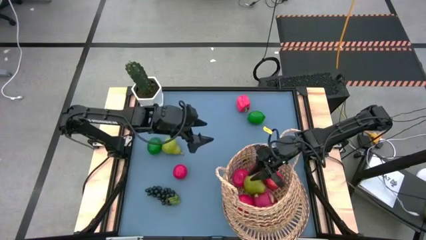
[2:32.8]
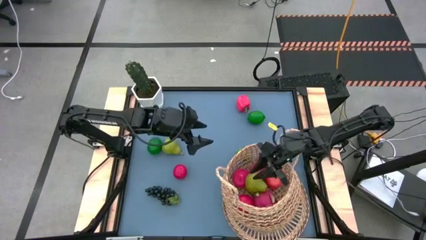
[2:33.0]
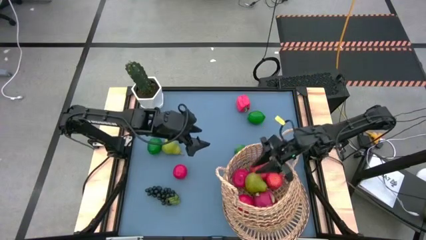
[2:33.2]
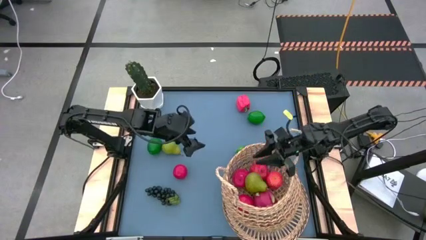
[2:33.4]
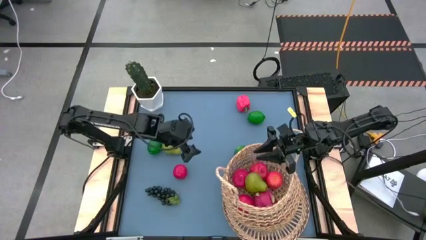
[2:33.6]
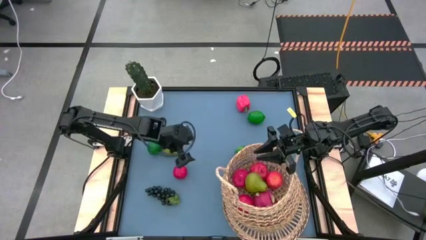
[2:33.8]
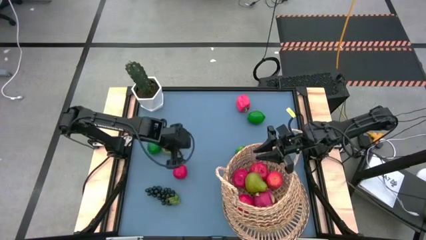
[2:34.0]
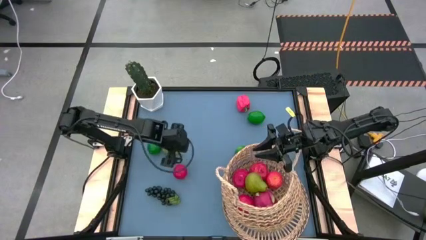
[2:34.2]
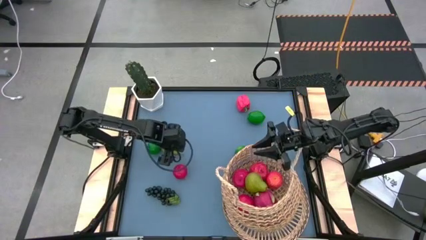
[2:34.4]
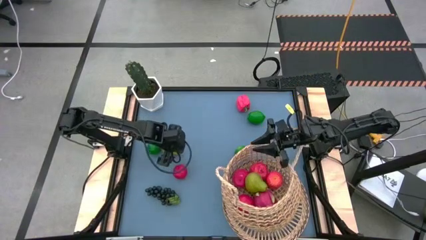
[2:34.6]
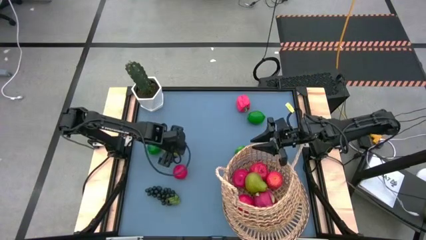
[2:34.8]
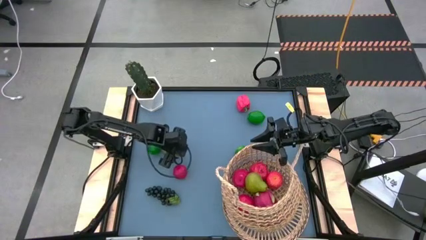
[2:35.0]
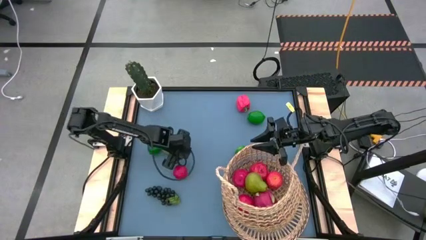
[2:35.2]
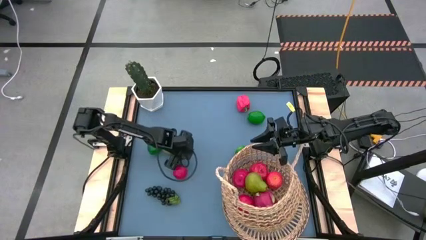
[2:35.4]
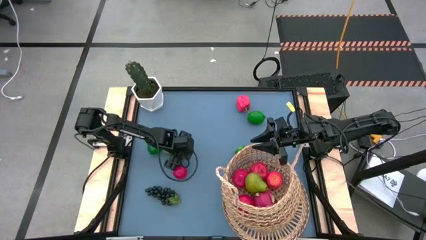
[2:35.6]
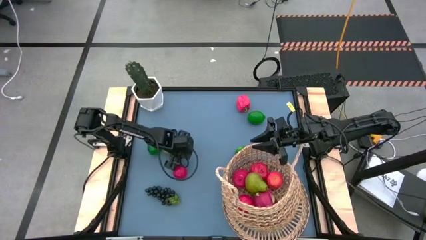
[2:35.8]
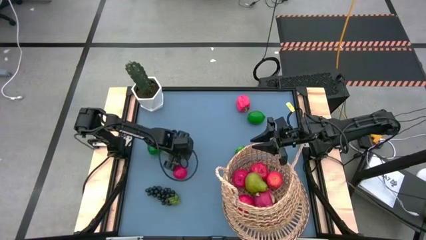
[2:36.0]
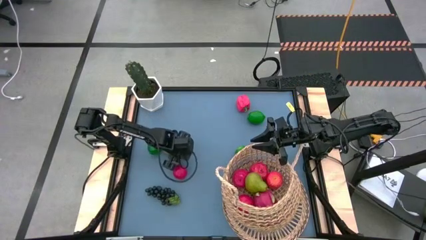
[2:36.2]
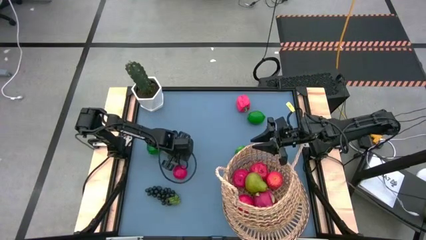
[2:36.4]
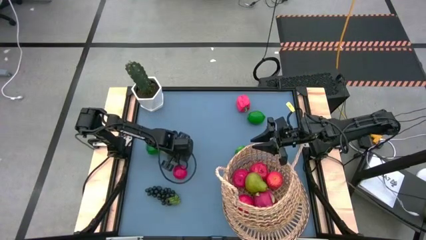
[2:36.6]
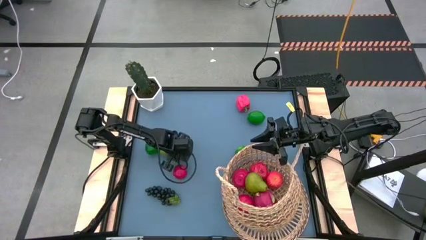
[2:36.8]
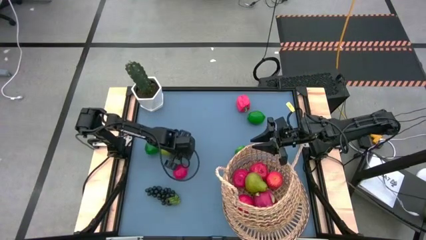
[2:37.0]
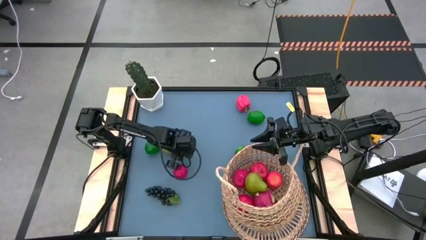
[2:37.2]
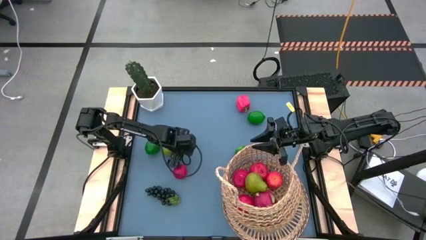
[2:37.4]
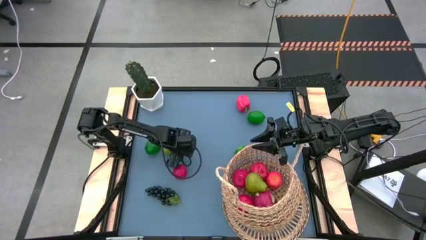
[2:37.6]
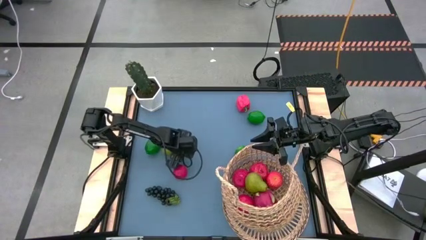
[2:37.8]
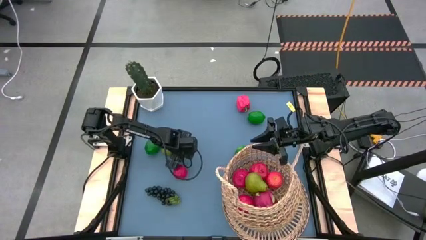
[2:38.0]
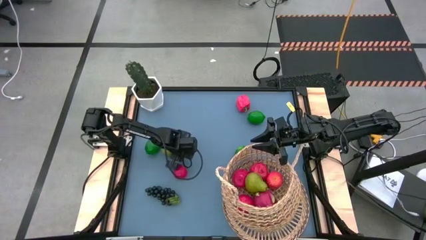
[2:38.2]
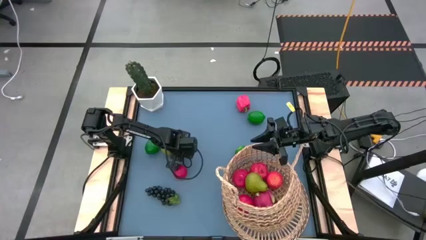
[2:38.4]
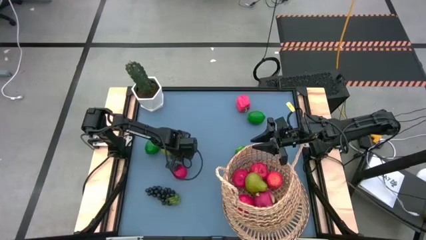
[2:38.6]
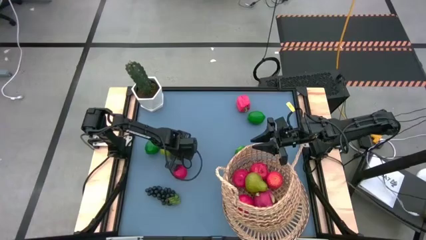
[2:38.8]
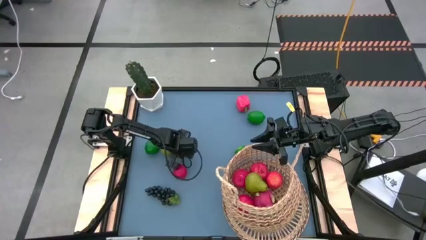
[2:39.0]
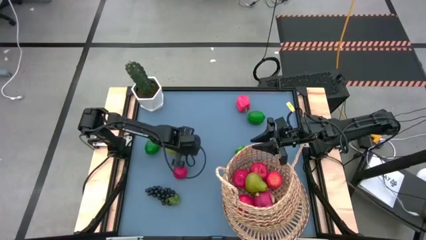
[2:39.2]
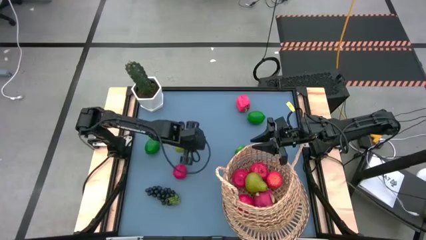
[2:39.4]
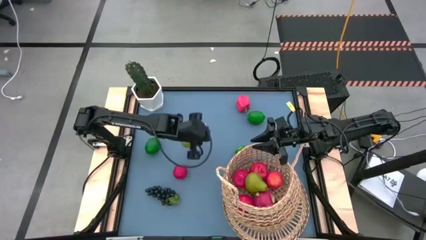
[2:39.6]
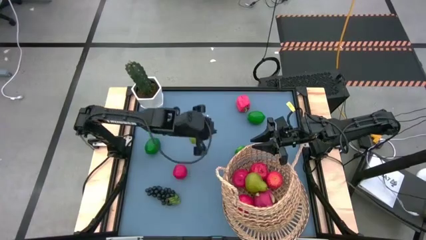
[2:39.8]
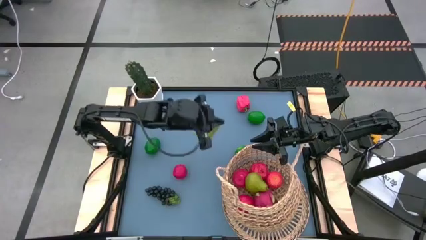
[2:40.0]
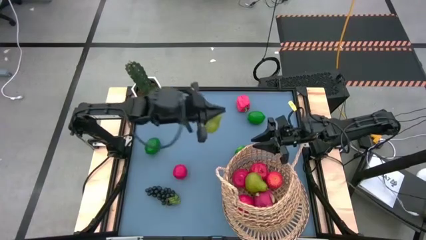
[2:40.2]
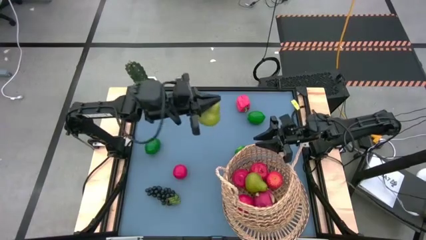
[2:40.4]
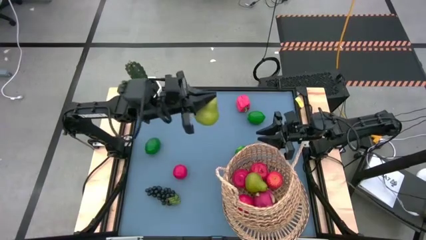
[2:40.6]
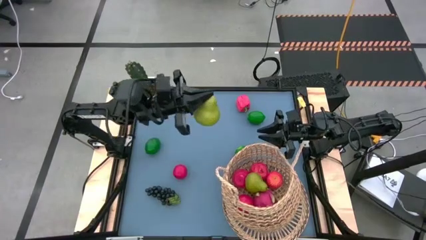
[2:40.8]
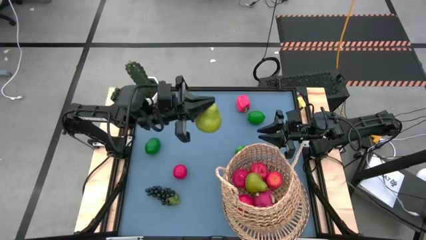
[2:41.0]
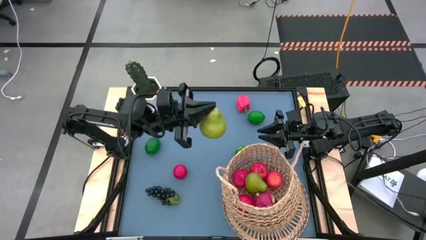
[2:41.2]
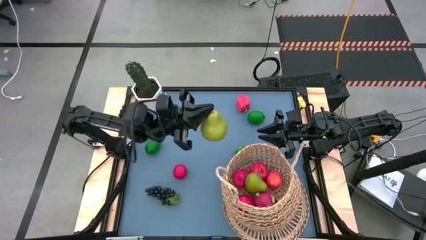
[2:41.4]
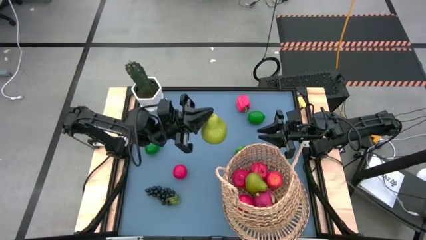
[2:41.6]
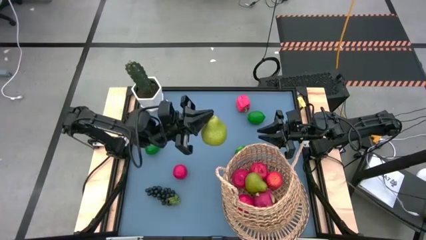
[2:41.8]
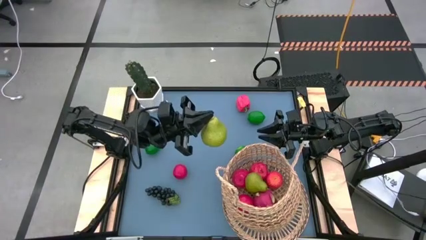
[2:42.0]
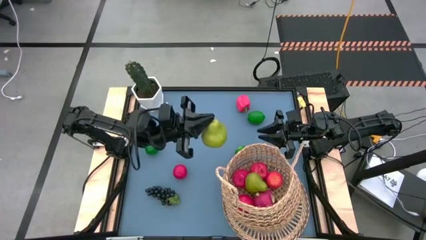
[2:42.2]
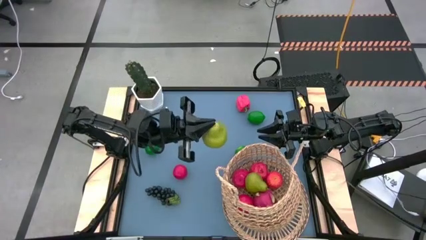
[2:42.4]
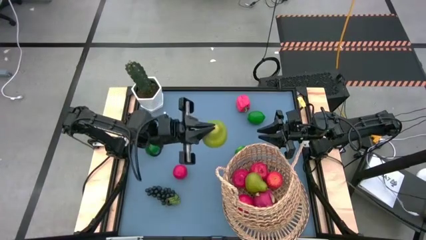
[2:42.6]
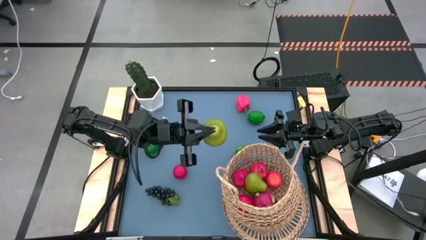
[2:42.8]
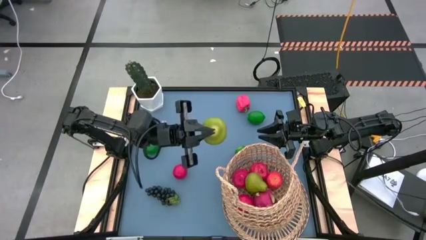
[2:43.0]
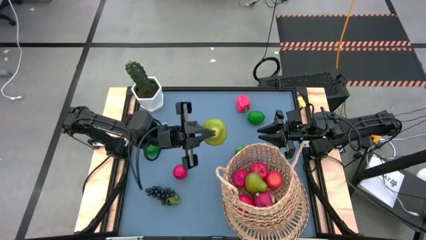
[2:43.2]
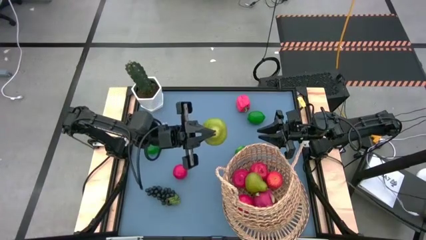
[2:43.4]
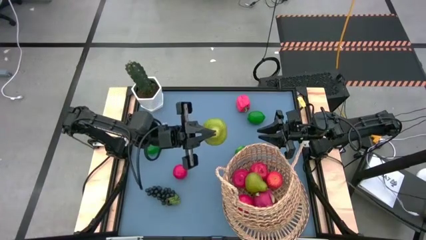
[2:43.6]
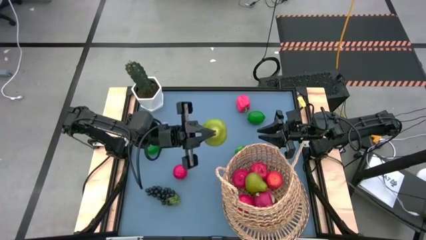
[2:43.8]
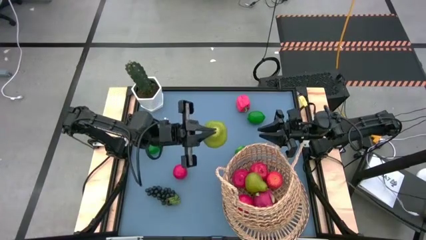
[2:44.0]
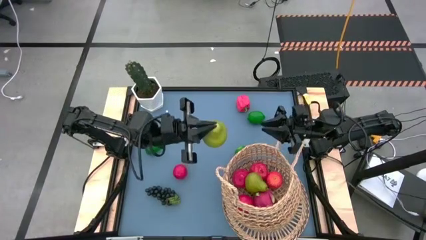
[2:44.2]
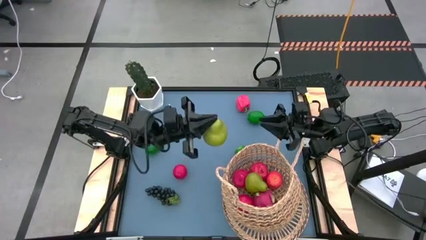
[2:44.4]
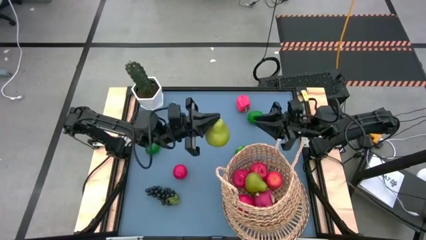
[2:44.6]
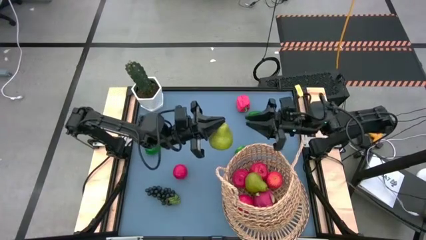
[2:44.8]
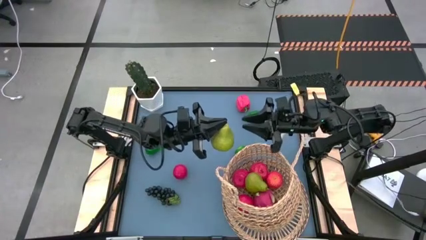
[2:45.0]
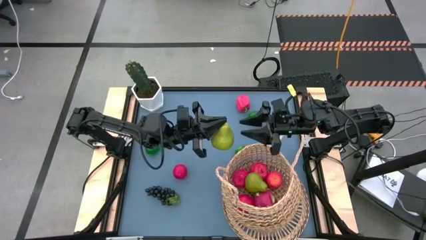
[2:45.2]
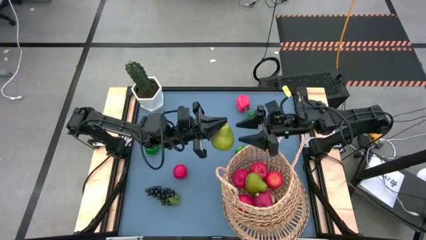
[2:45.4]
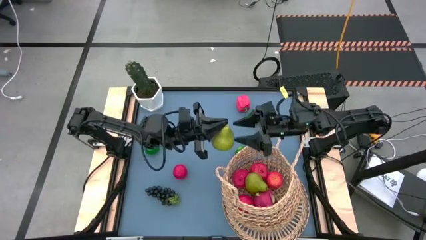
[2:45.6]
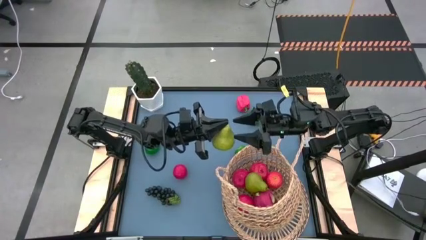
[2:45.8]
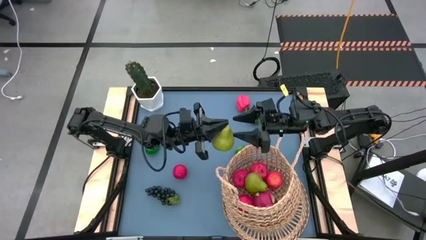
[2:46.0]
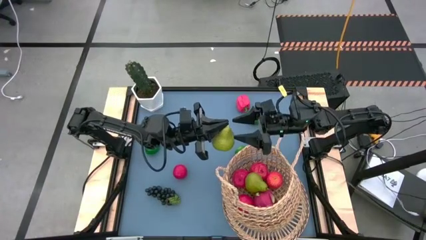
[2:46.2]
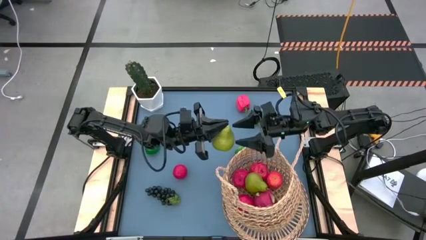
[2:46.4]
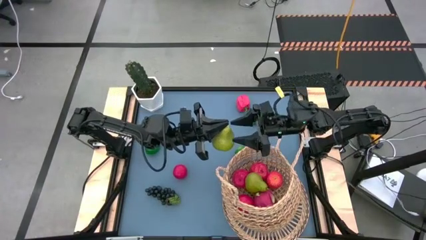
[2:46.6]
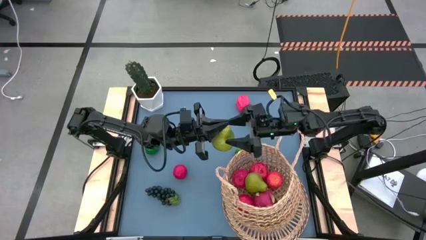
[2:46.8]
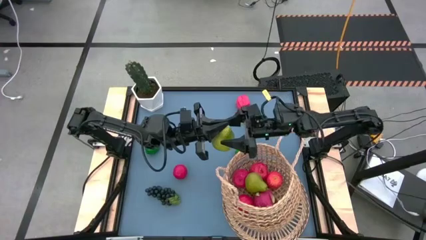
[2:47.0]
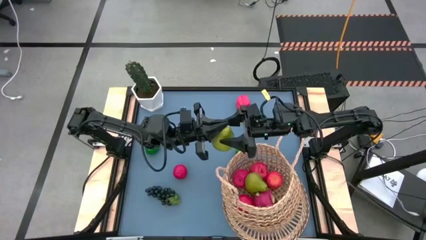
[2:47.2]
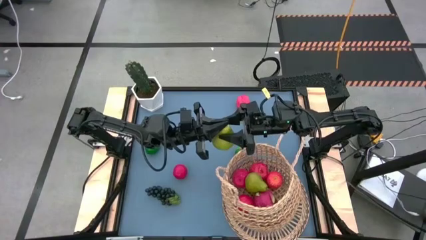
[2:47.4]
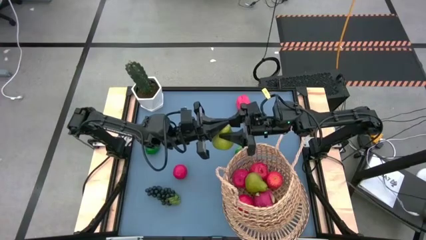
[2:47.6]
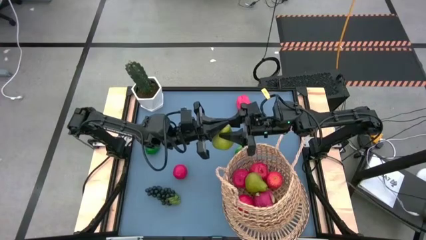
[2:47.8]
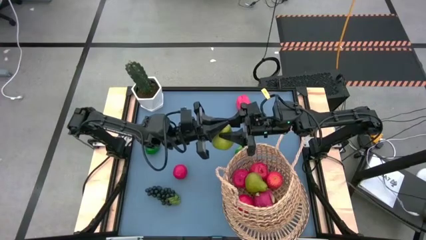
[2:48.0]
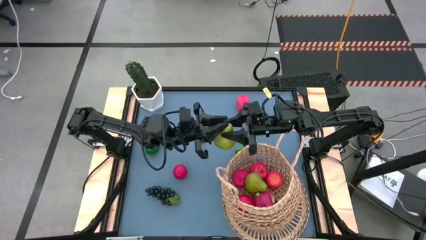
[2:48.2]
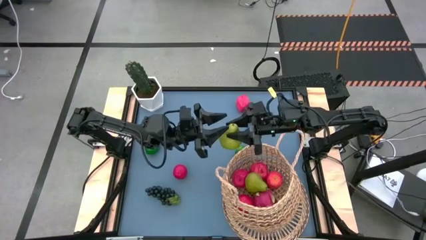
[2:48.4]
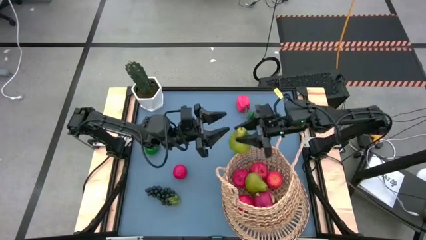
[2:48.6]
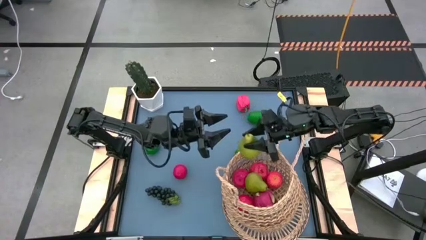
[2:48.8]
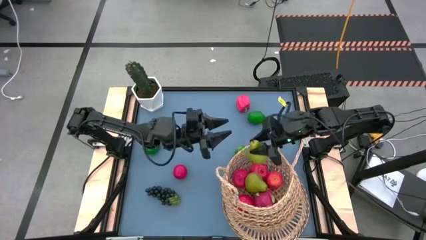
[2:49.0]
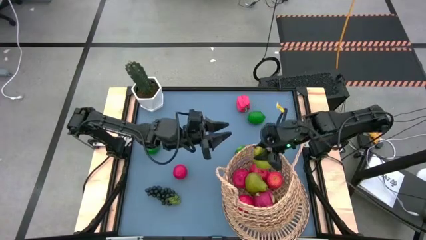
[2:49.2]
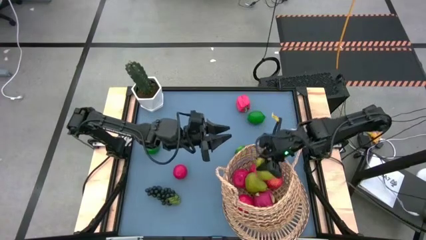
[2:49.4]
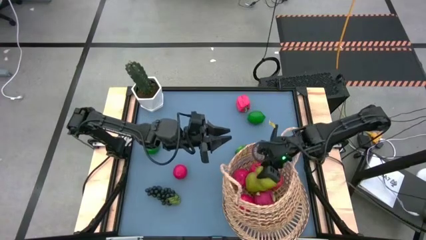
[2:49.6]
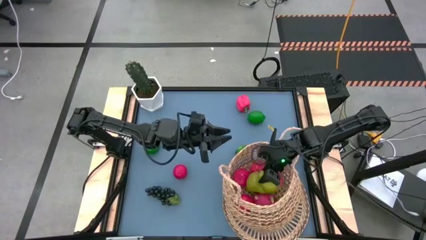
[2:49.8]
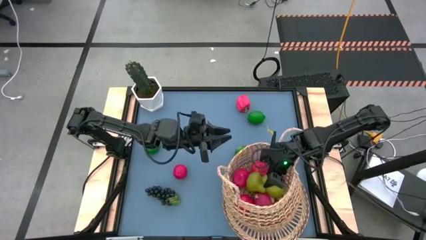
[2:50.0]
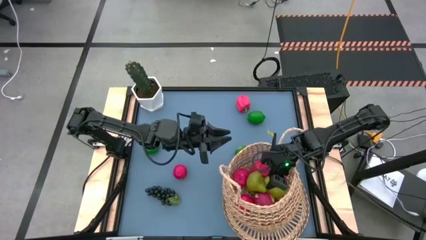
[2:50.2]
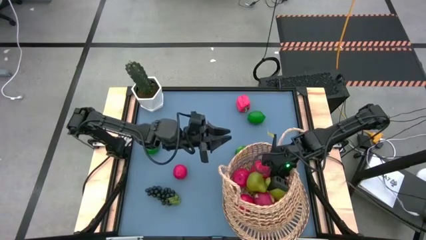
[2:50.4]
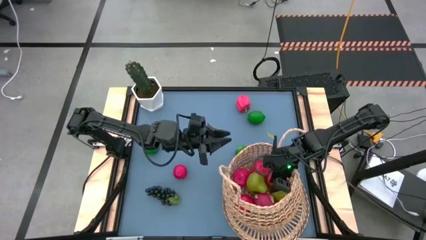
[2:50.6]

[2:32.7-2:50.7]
Task: Build produce basket
Put the green pear into the brown basket
